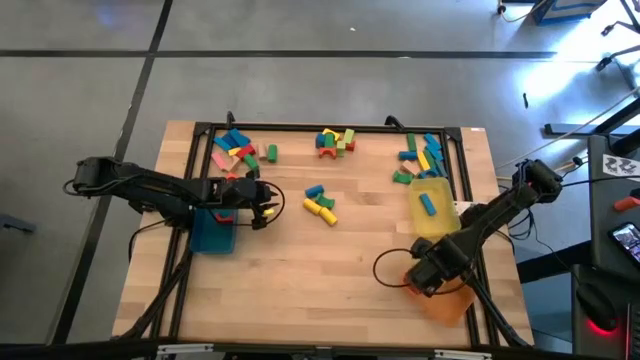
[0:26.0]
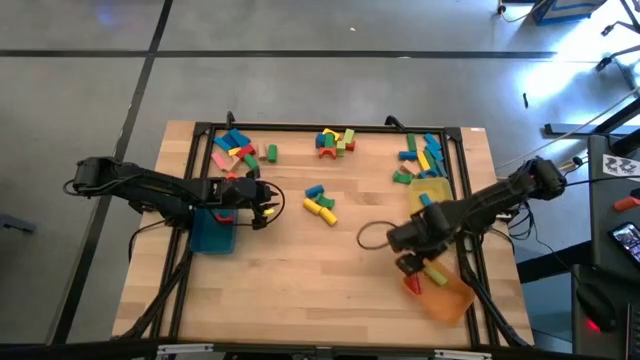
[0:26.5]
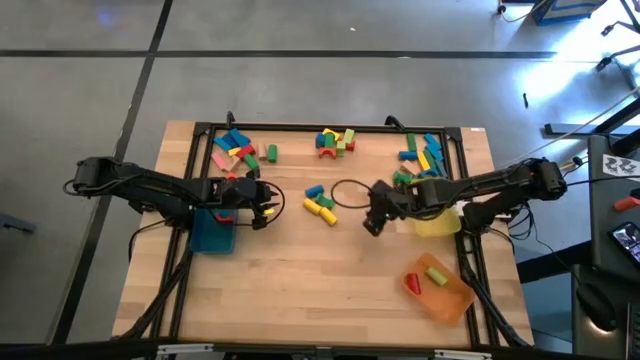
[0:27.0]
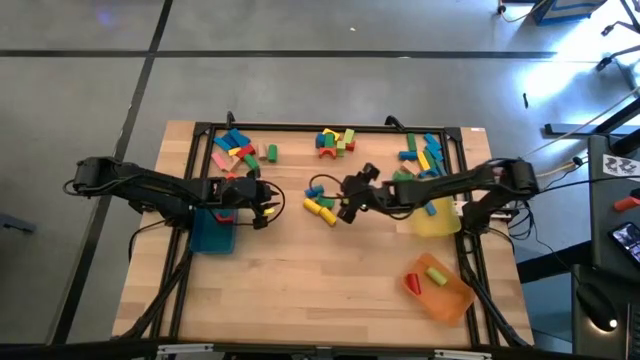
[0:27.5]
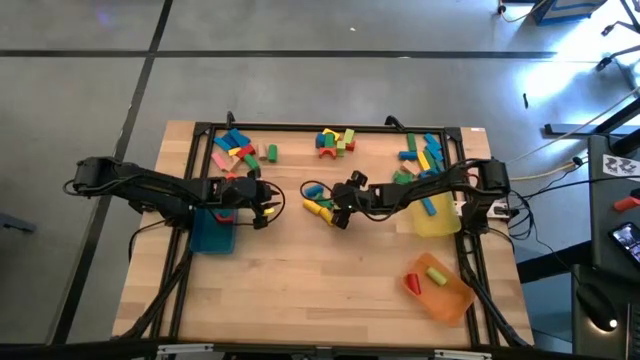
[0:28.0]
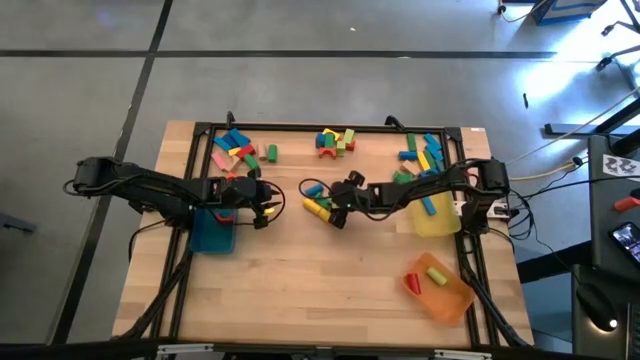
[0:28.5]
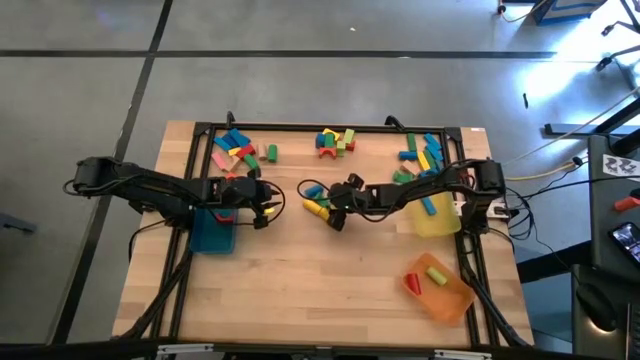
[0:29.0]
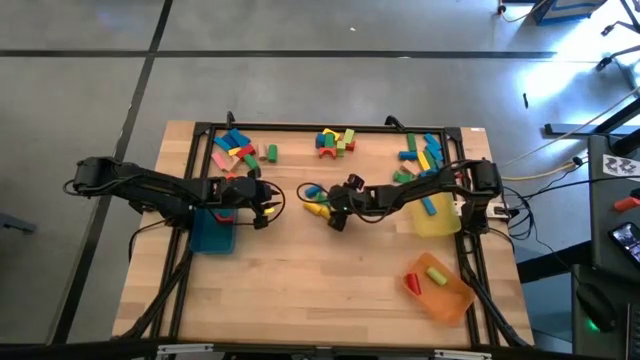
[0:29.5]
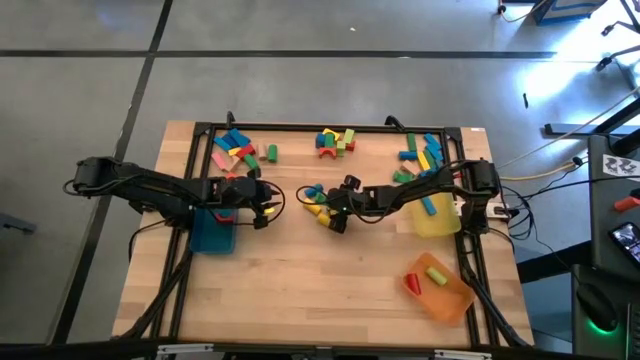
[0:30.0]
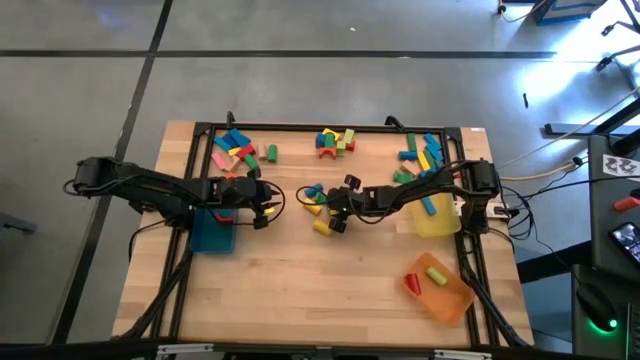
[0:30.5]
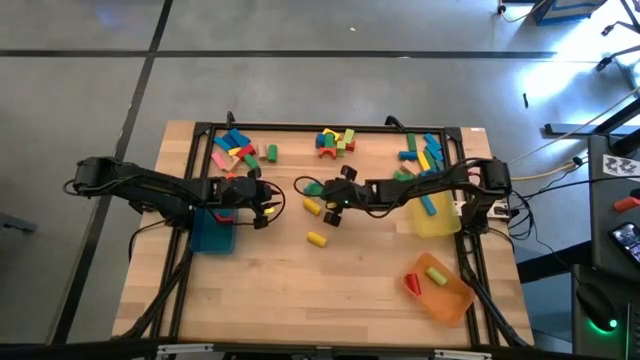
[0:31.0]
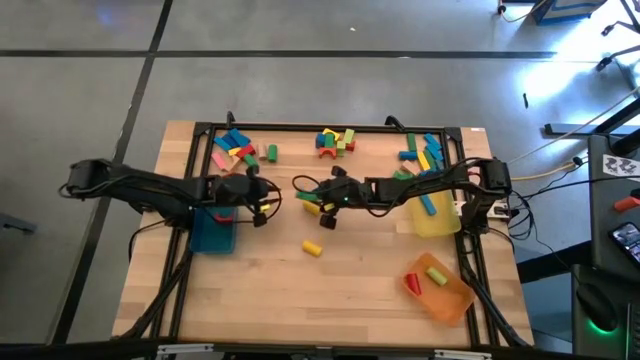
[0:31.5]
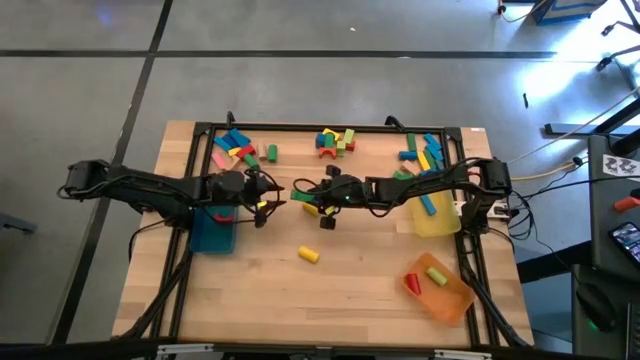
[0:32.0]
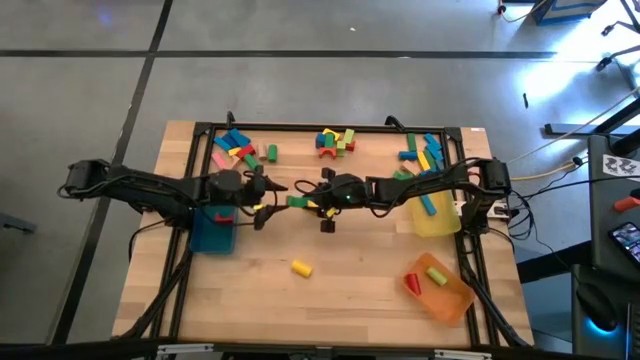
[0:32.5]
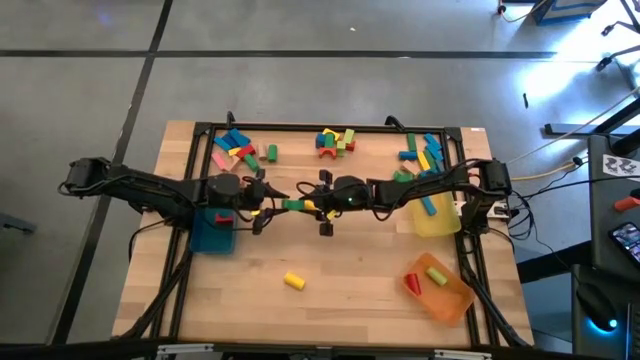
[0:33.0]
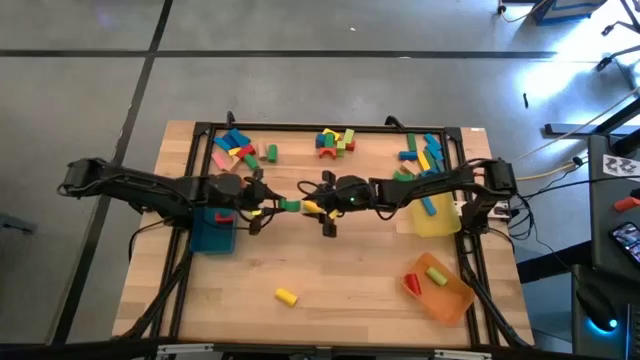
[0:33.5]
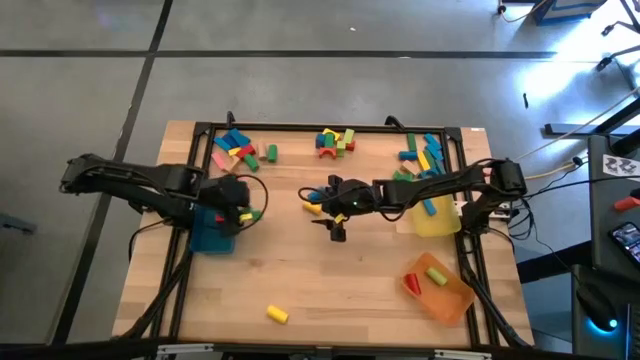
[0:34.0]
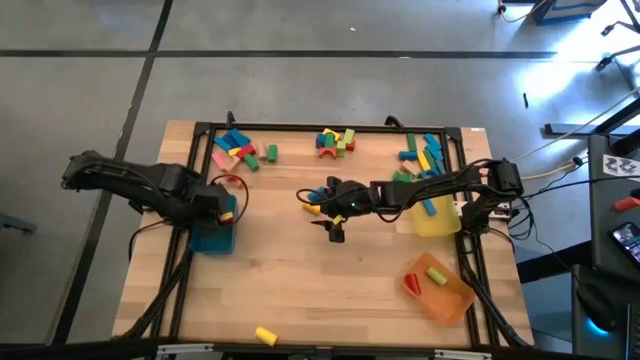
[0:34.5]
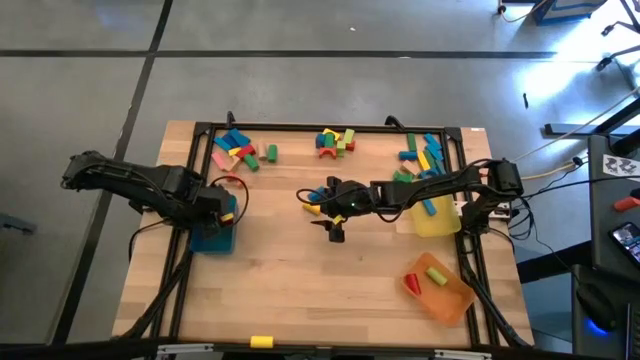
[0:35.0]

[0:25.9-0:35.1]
Task: Sort blocks by size
Put the green arch block into the blue bin

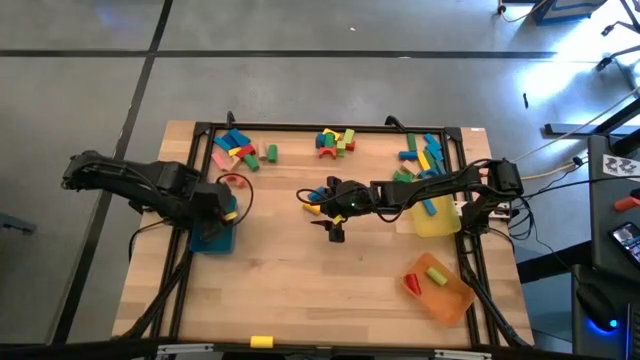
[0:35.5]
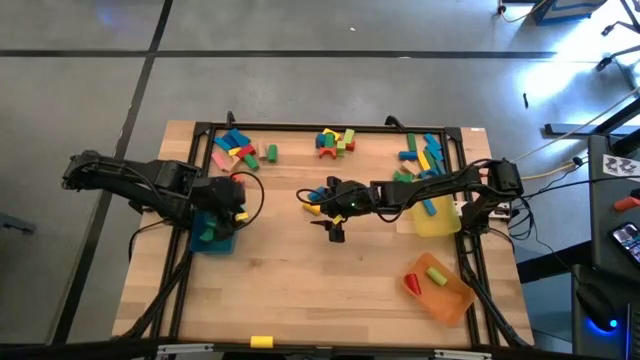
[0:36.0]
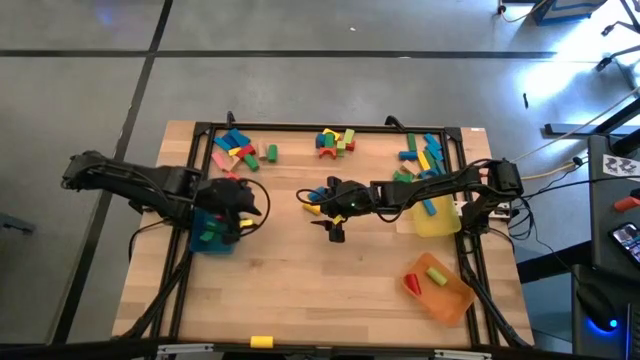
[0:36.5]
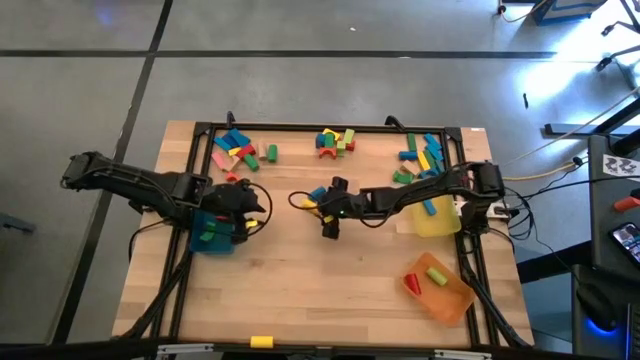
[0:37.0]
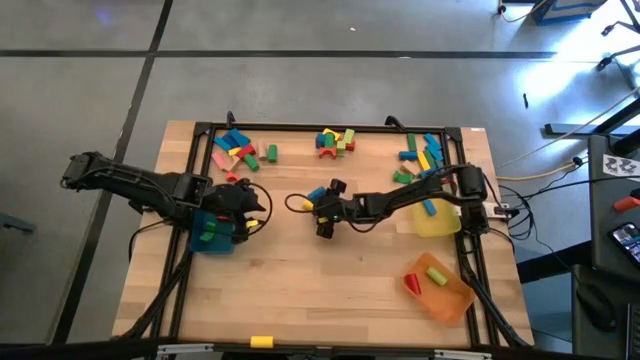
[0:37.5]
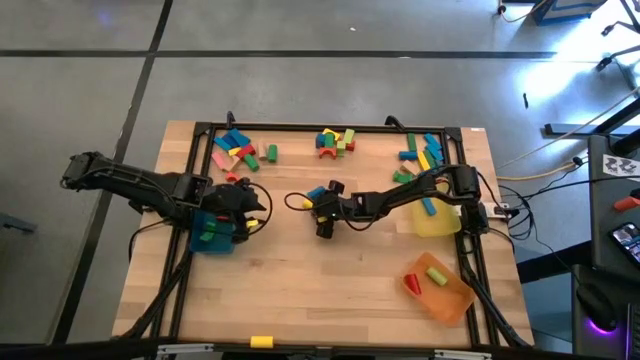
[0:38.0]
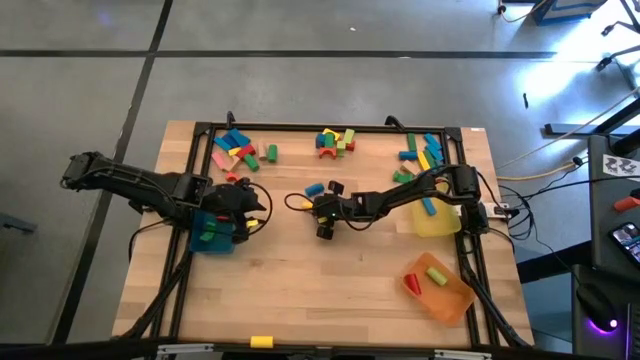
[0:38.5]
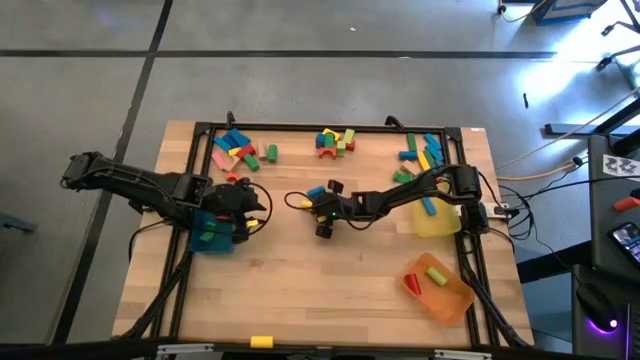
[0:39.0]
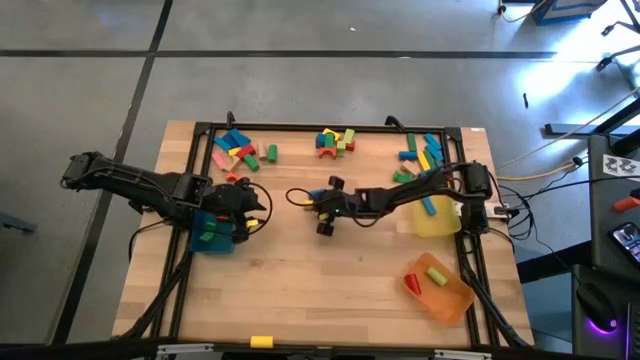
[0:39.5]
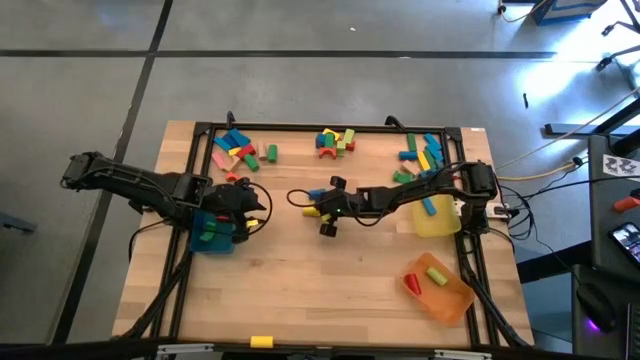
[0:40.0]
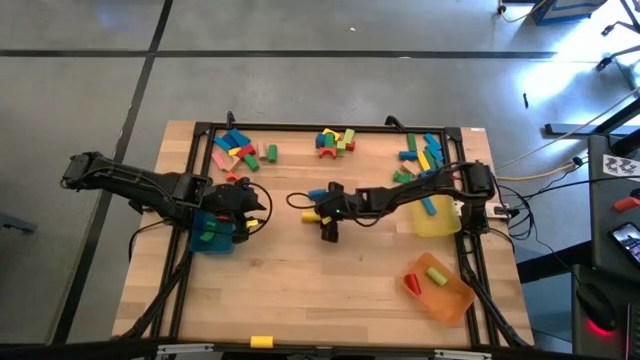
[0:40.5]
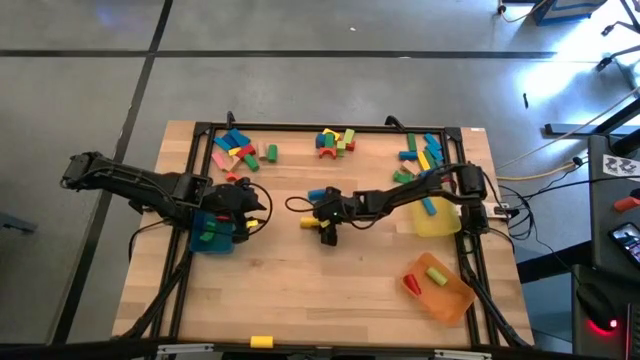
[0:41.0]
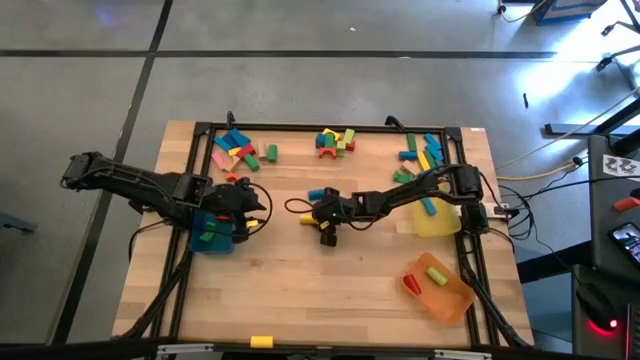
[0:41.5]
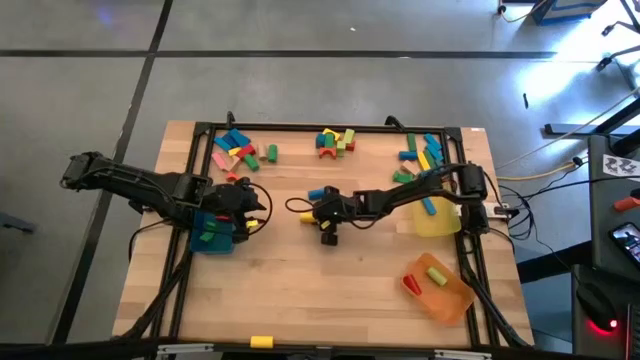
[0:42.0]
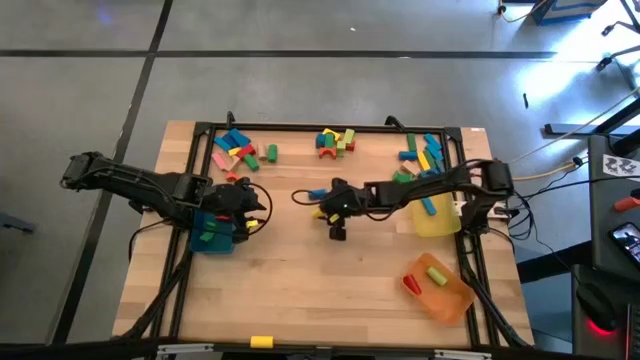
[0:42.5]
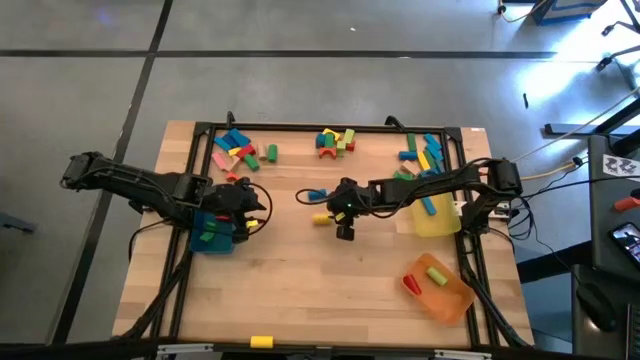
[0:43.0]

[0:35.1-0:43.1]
Put the yellow cylindrical block into the orange bin

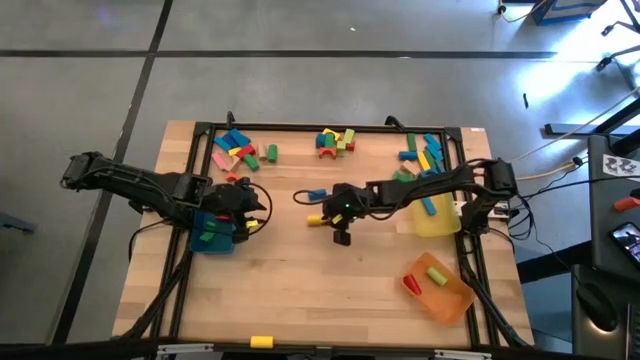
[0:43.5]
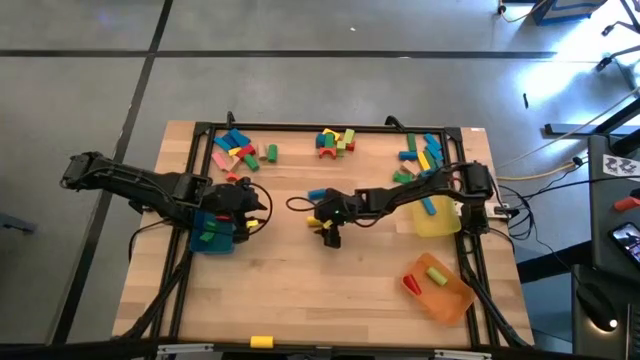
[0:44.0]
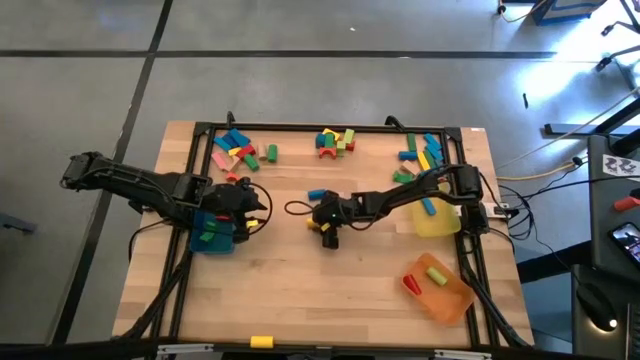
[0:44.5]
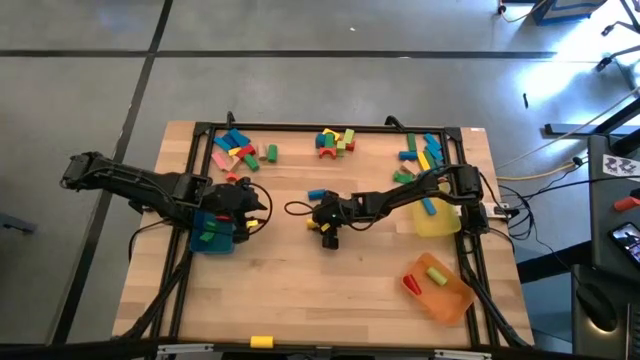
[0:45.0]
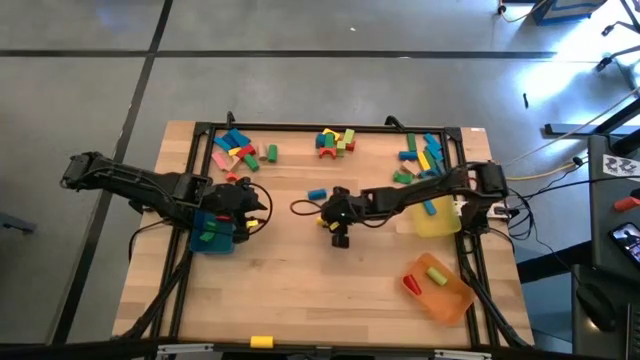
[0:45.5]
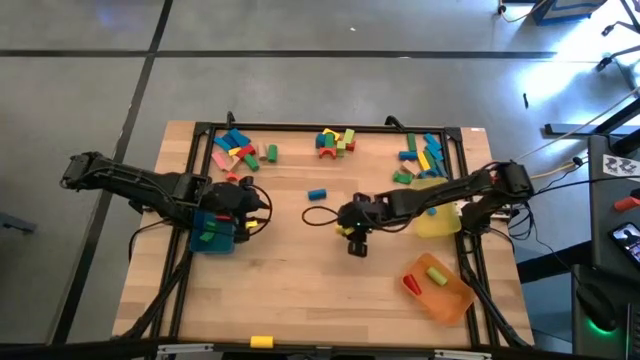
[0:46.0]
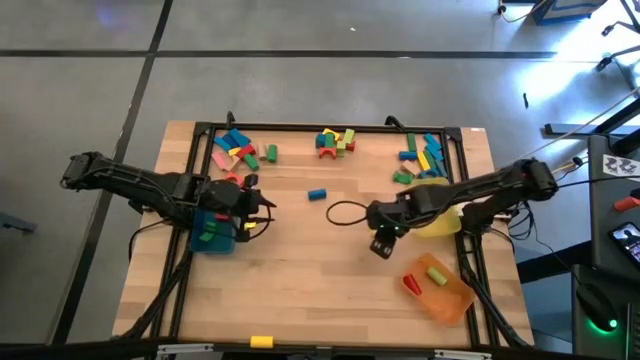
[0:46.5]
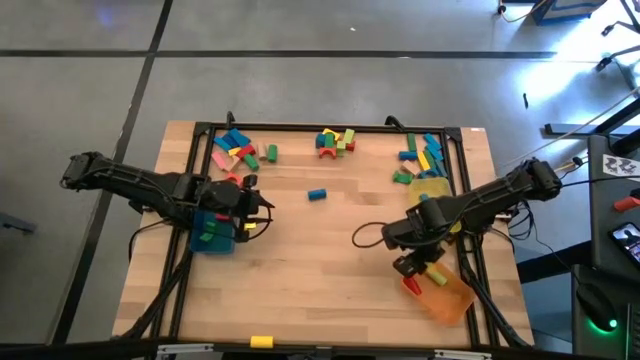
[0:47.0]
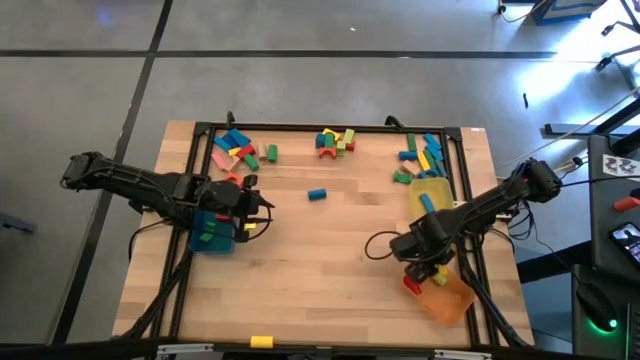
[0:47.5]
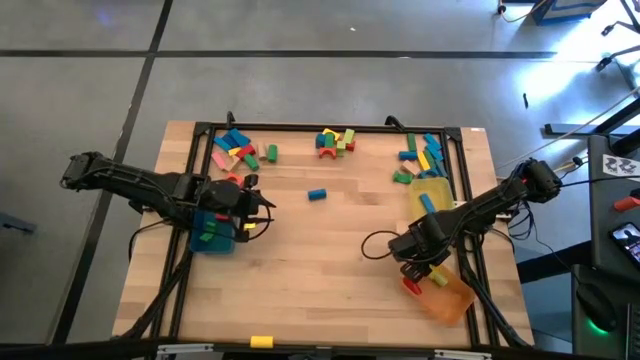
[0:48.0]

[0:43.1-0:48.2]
Put the yellow cylindrical block into the orange bin
